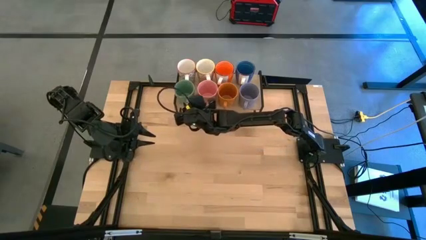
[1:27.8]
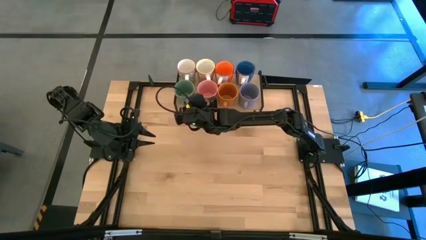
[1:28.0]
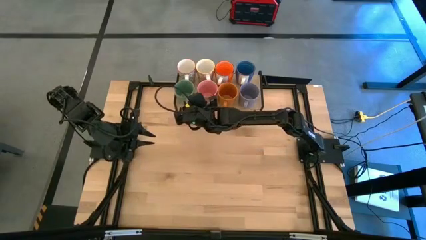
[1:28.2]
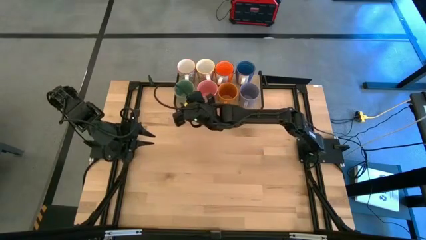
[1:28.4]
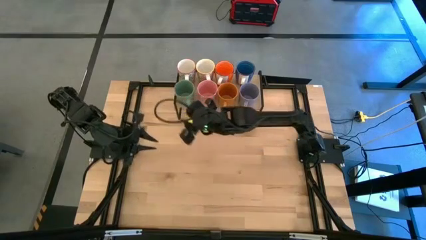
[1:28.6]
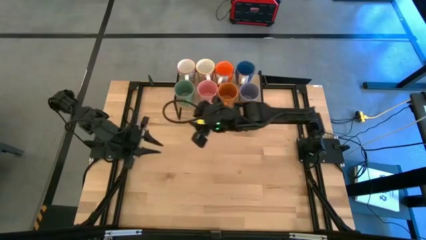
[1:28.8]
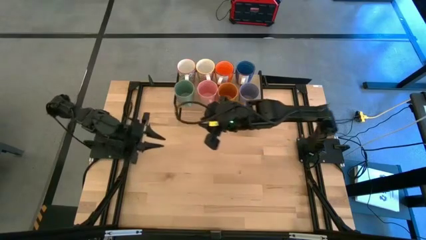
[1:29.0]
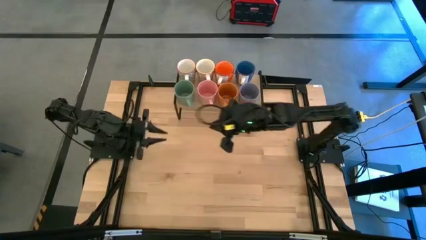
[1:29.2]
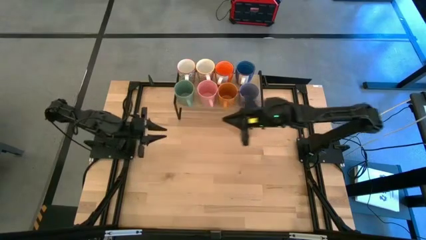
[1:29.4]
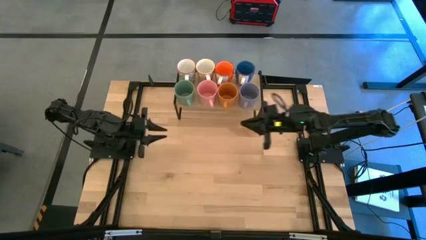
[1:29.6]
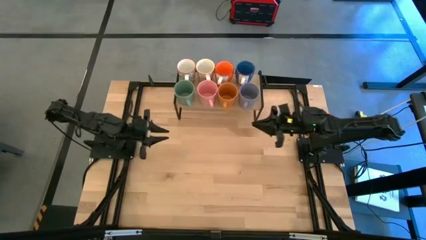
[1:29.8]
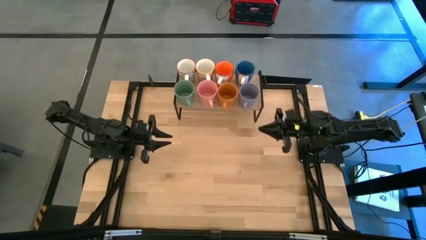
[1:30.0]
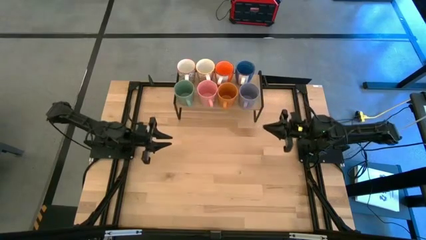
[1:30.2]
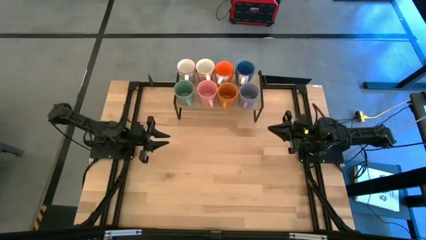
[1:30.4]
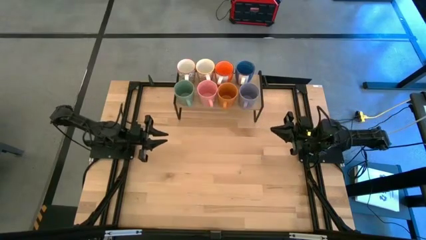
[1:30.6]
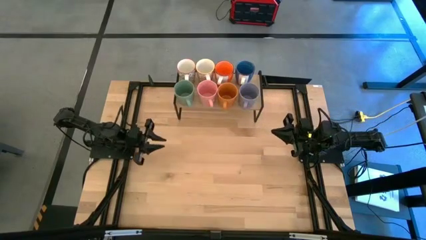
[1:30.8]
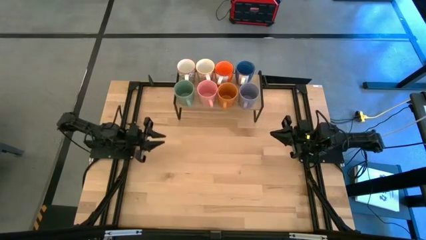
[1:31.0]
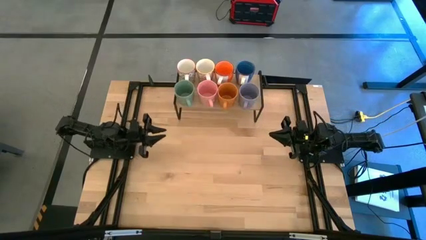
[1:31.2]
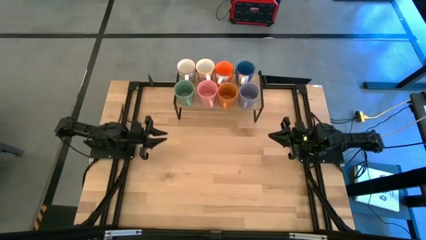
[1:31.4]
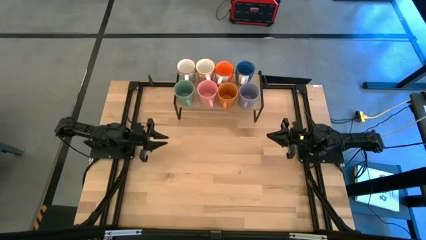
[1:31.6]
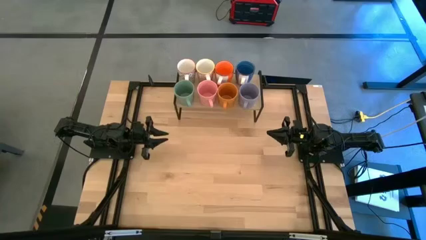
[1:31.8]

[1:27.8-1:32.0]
Task: Place coffee mugs
Return to Home Position

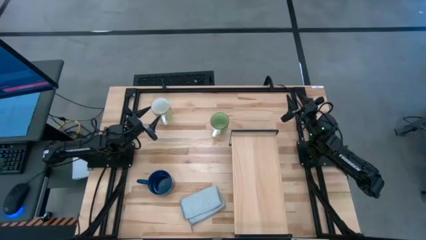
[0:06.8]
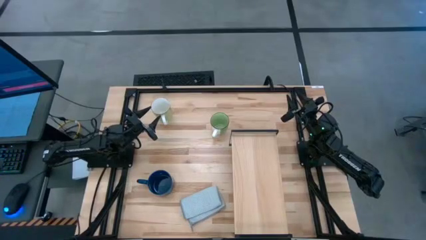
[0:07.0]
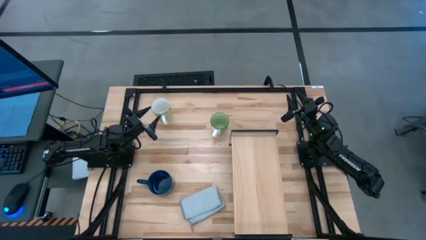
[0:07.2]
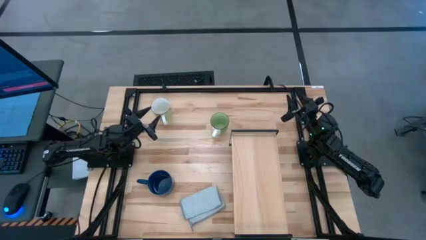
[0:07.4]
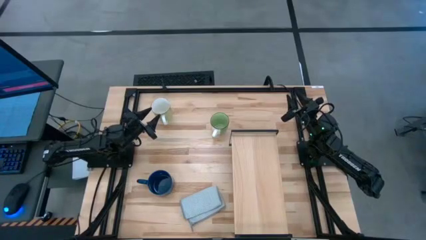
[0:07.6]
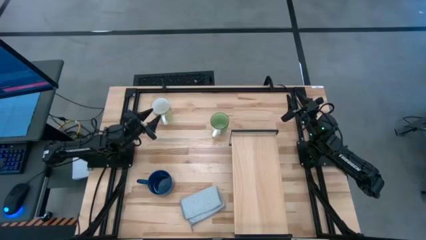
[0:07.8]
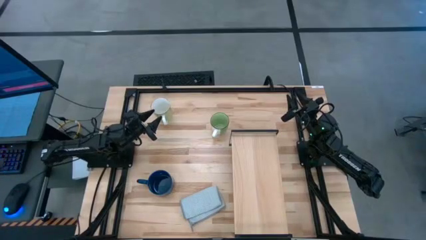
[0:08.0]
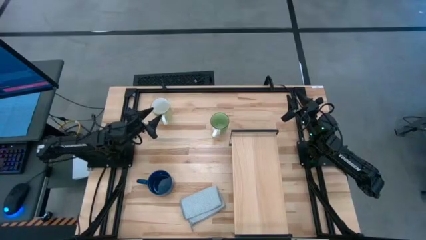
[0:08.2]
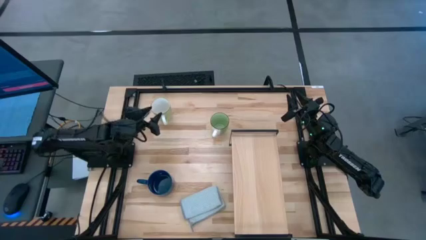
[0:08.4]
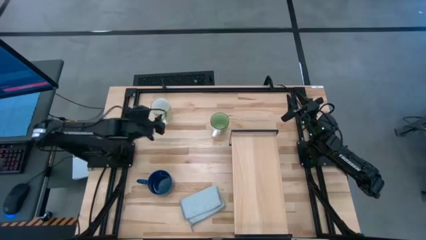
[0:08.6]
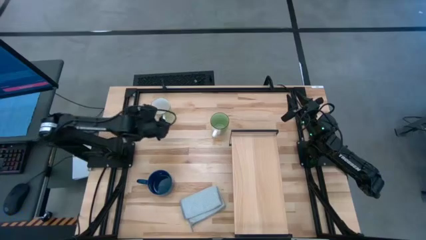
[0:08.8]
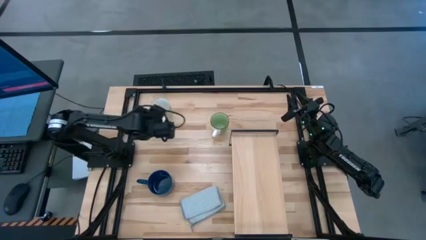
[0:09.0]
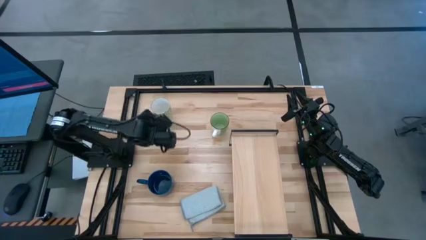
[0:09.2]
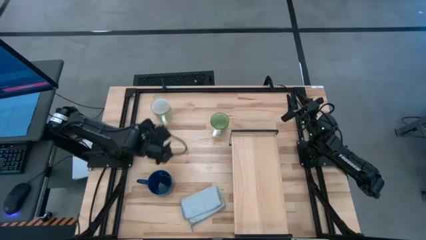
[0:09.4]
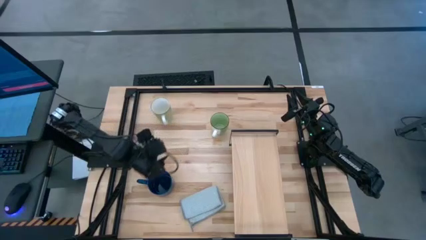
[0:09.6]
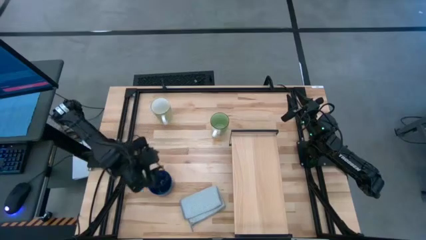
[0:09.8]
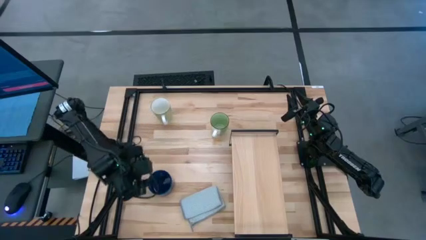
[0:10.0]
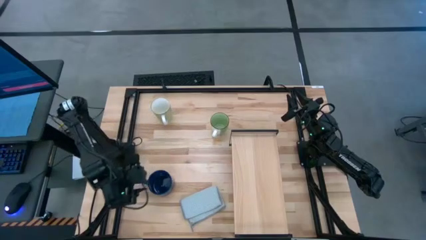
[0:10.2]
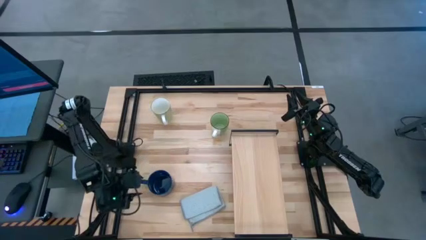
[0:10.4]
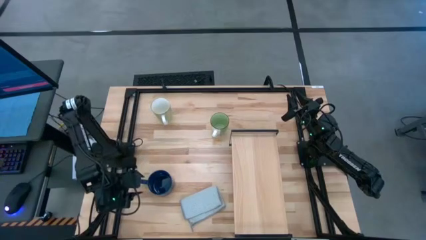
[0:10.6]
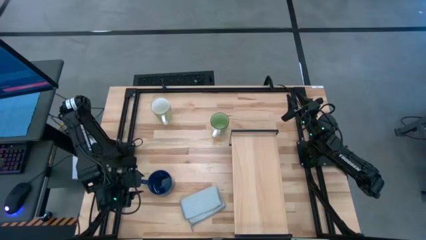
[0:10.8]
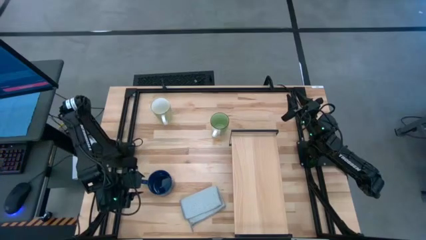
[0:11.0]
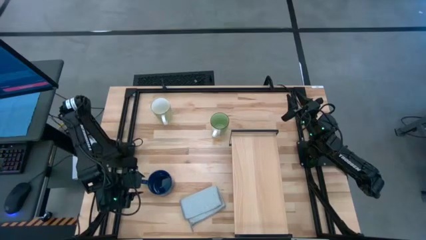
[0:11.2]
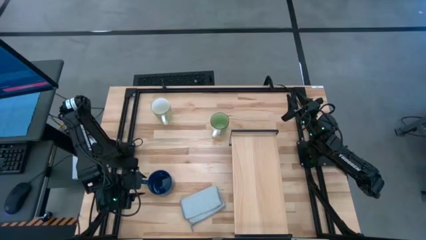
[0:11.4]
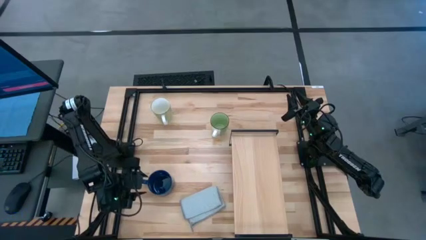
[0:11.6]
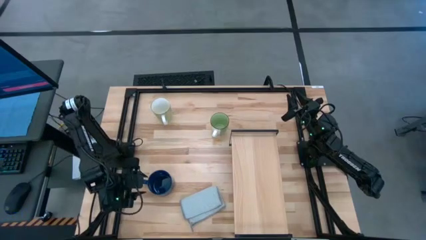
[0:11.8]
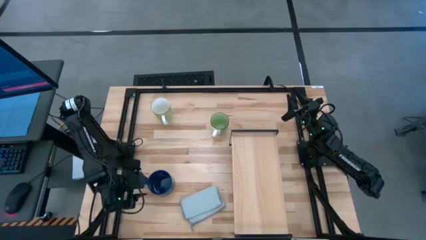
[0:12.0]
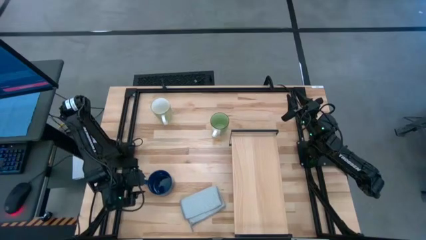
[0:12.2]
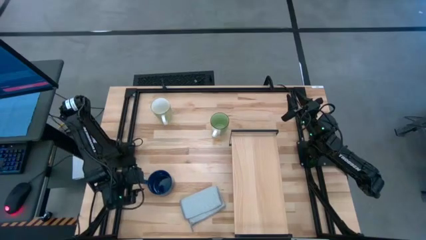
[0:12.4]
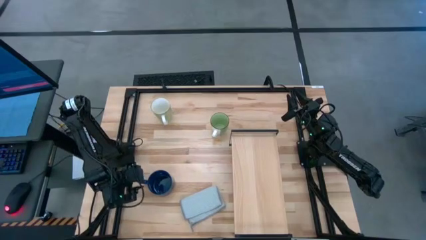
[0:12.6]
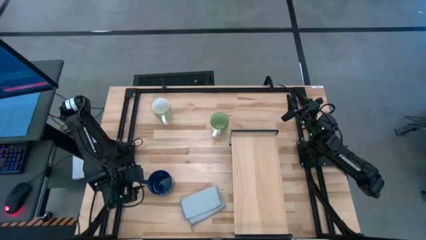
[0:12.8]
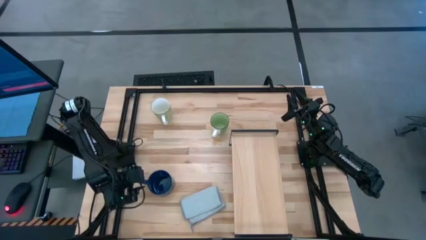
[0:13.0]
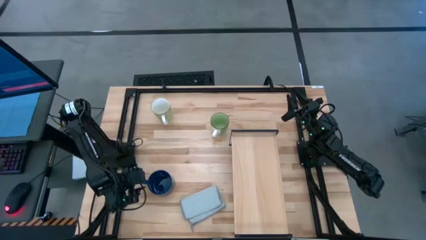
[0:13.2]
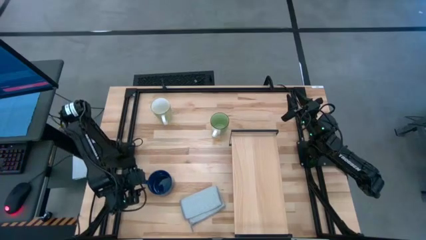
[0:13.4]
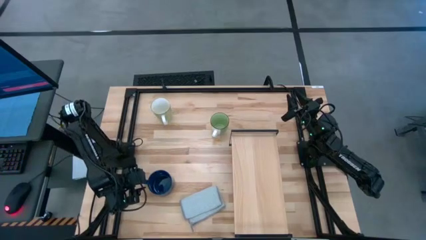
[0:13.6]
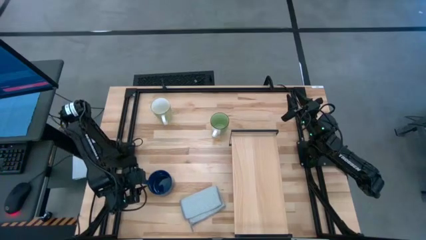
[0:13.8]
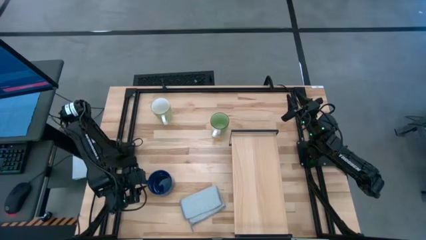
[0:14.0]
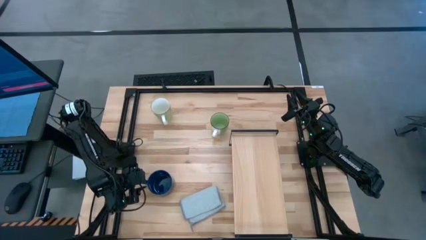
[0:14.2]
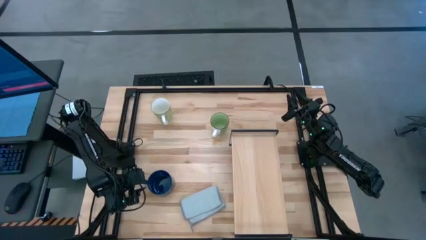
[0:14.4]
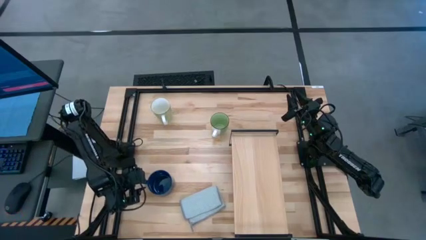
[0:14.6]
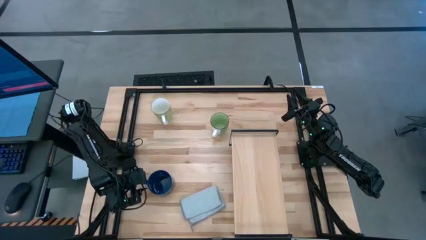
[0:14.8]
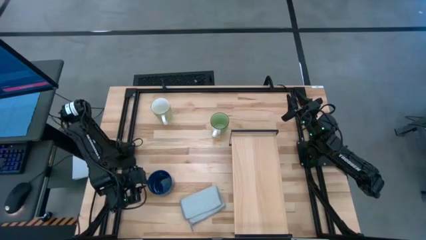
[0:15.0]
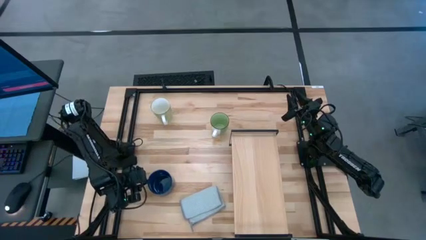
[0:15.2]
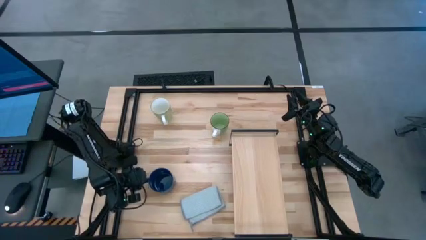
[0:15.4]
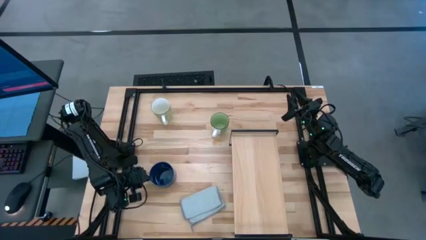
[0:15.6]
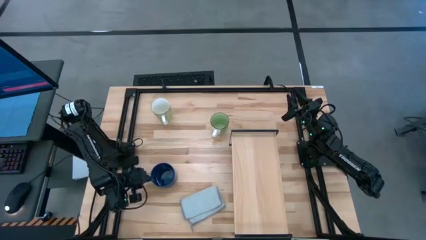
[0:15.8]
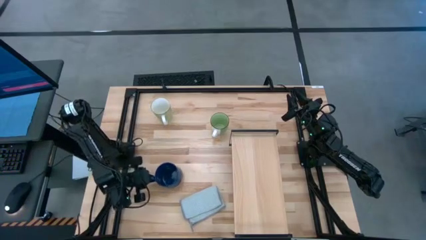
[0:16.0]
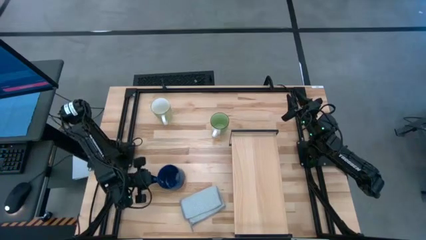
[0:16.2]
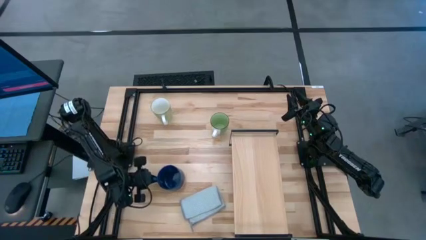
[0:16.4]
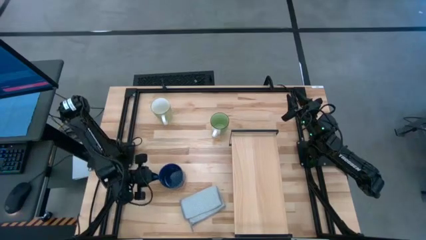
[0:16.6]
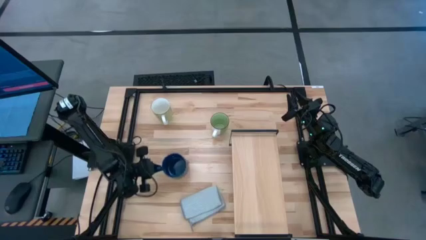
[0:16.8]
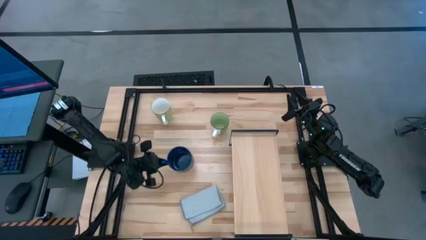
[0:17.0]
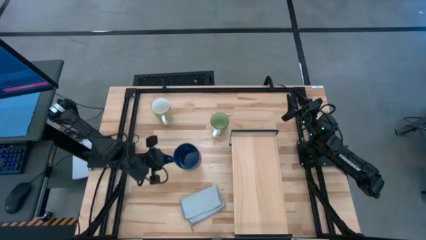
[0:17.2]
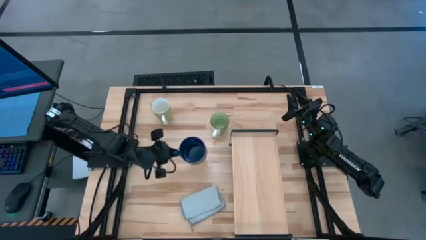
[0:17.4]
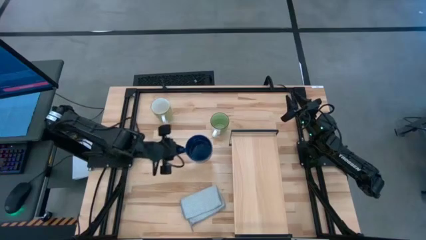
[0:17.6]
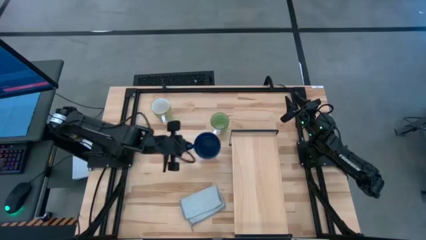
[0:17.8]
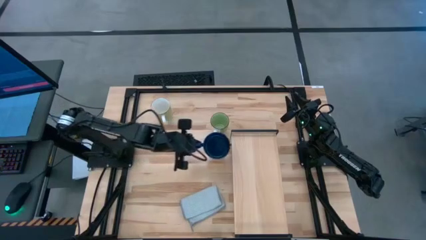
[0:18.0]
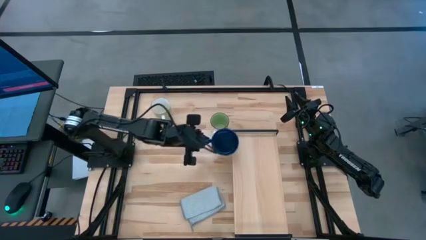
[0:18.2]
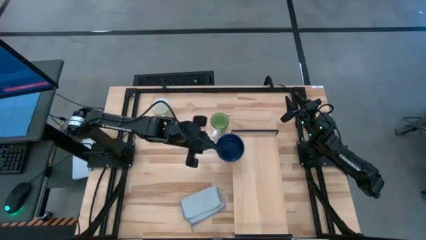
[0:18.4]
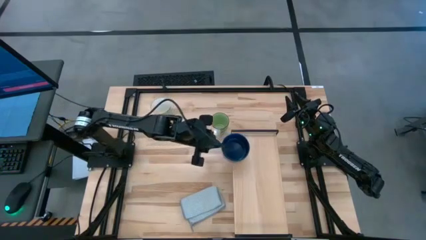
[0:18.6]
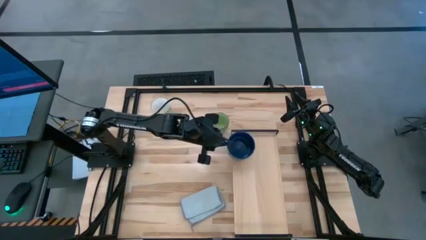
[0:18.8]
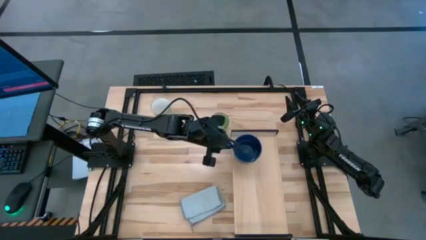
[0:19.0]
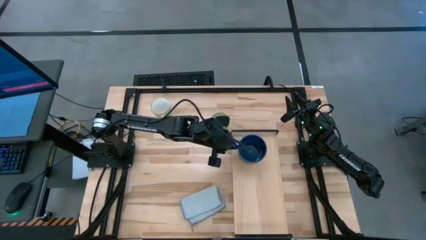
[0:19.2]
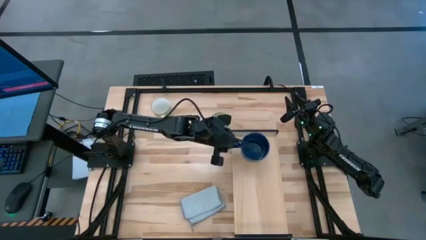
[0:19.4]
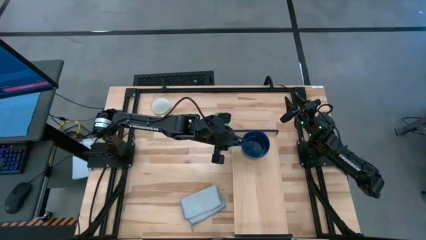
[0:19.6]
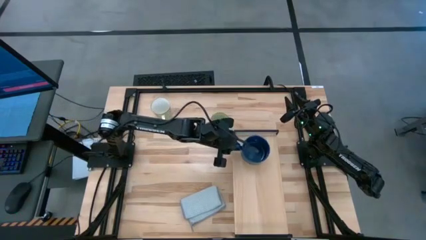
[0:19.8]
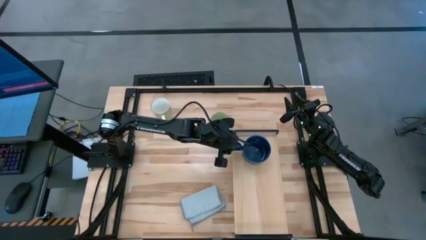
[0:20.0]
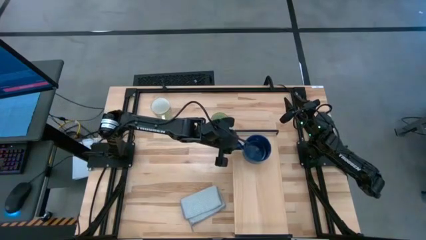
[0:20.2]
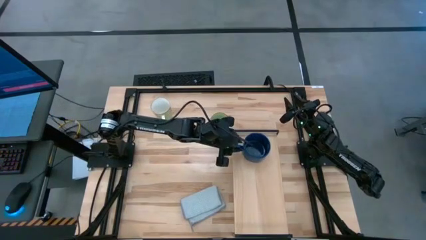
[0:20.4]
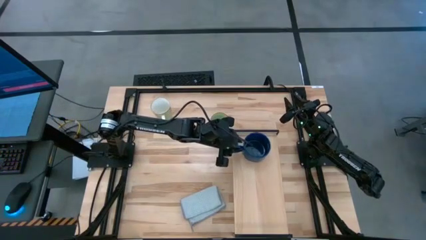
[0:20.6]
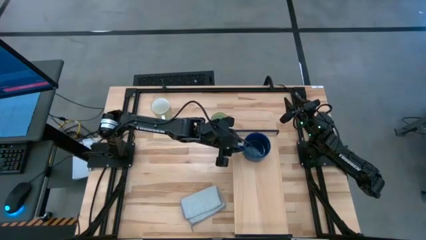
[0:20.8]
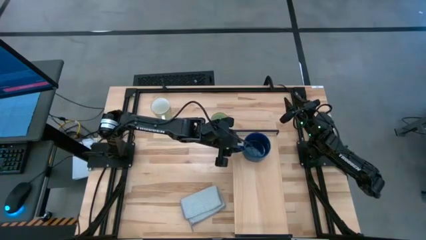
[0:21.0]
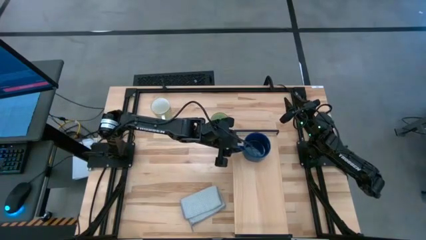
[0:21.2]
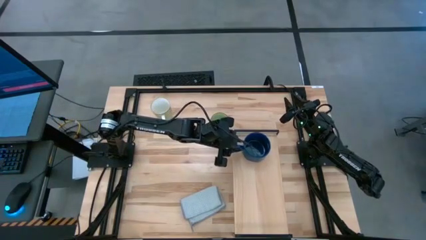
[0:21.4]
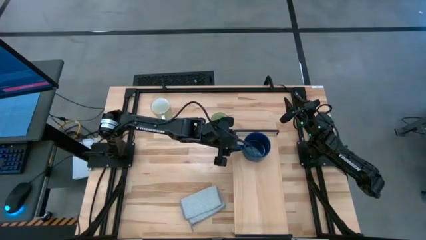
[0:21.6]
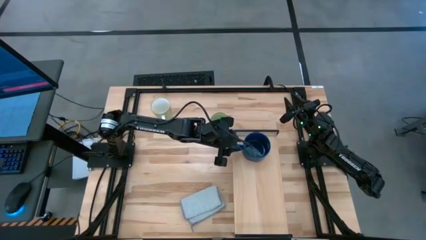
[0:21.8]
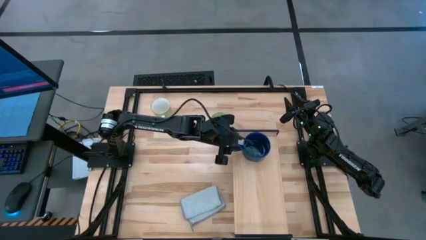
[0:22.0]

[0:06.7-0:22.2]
Task: Stack small to large cups/mugs on shelf
Put the blue cup on the shelf
